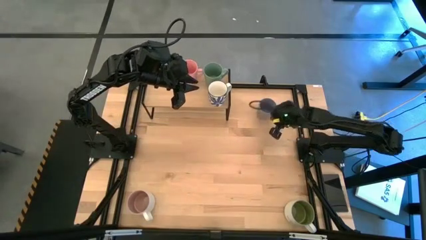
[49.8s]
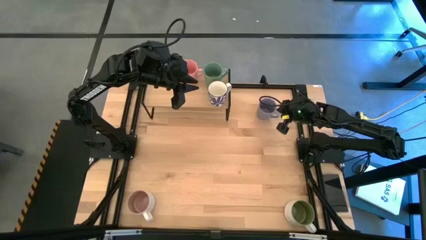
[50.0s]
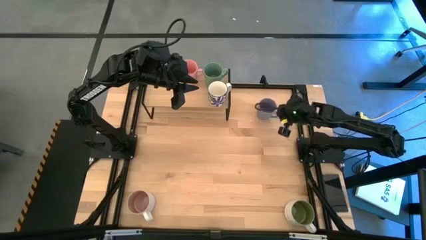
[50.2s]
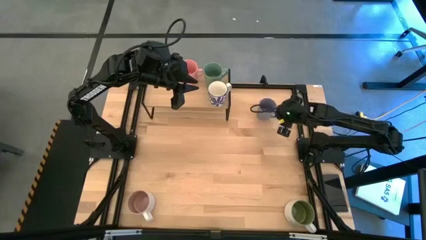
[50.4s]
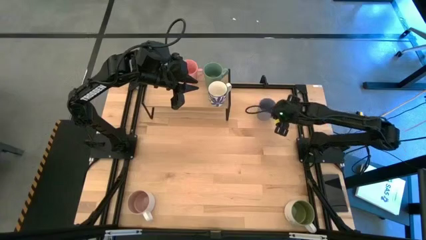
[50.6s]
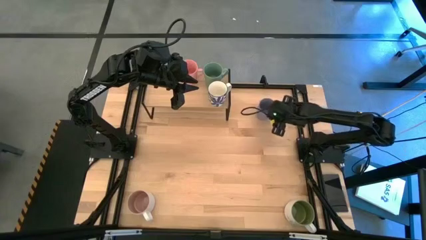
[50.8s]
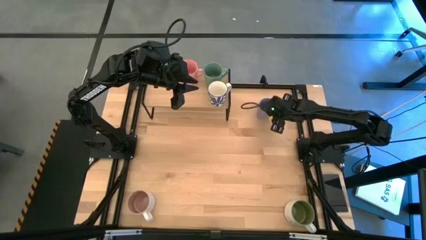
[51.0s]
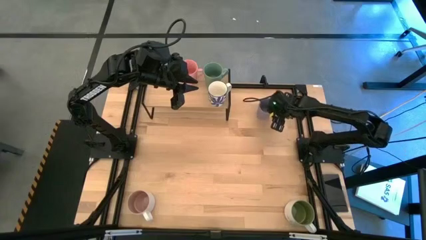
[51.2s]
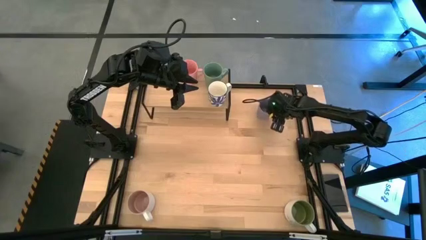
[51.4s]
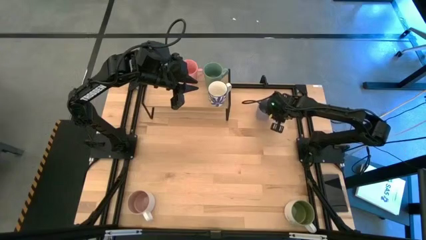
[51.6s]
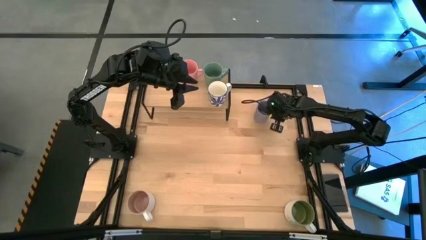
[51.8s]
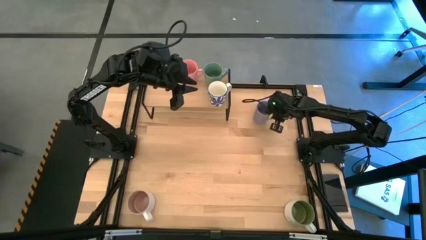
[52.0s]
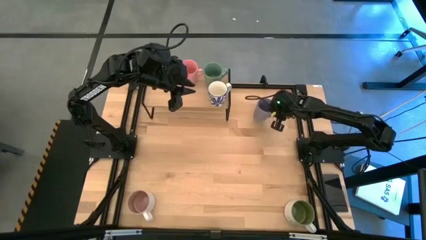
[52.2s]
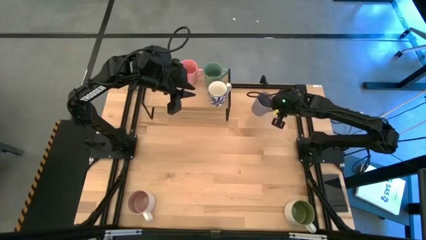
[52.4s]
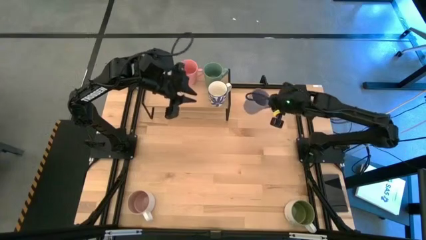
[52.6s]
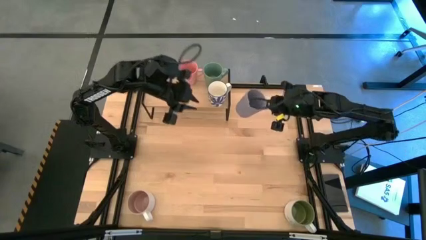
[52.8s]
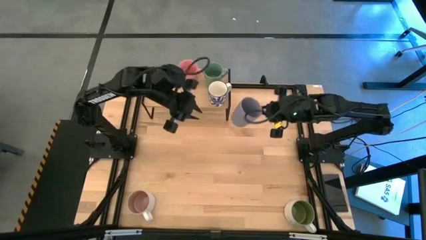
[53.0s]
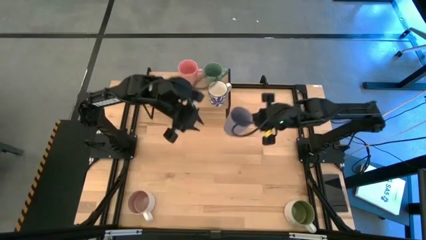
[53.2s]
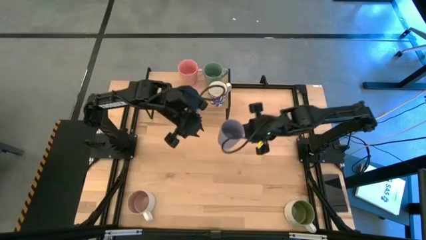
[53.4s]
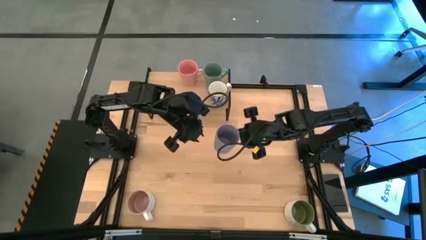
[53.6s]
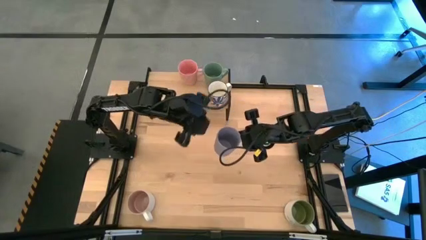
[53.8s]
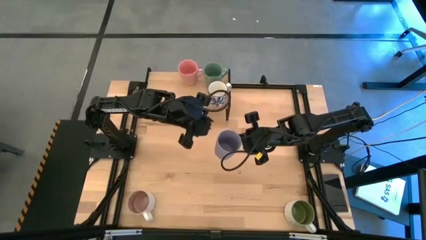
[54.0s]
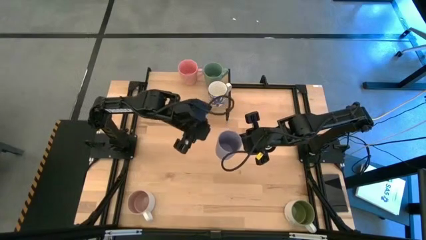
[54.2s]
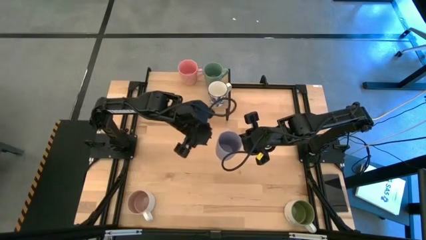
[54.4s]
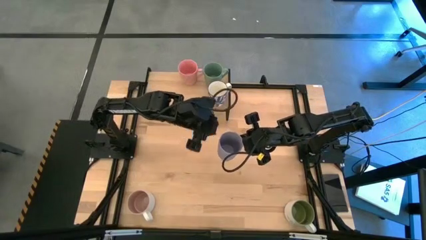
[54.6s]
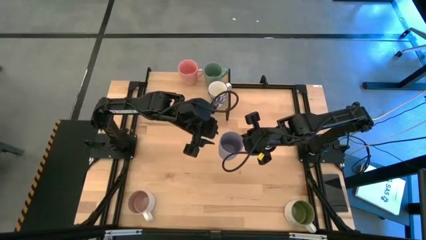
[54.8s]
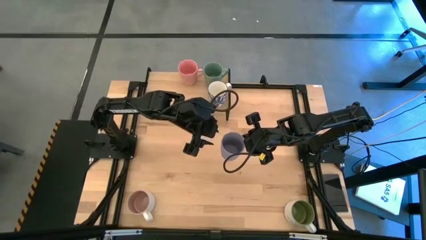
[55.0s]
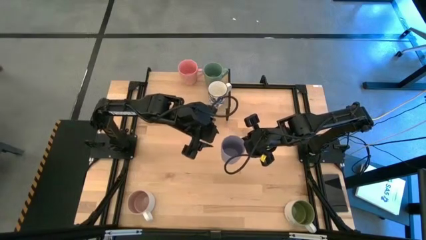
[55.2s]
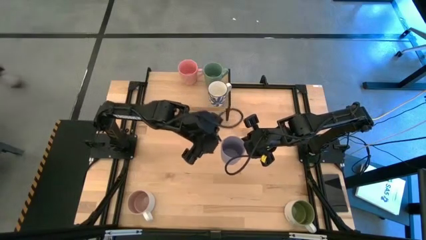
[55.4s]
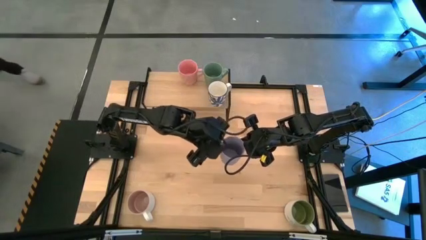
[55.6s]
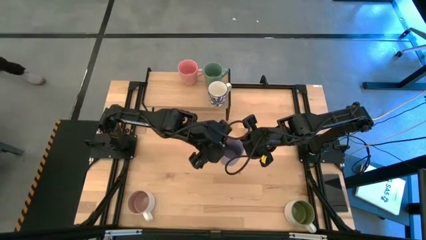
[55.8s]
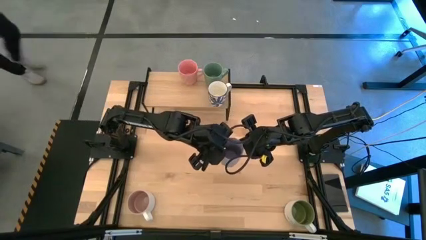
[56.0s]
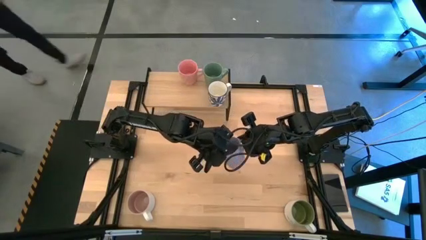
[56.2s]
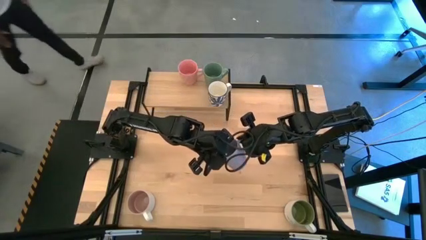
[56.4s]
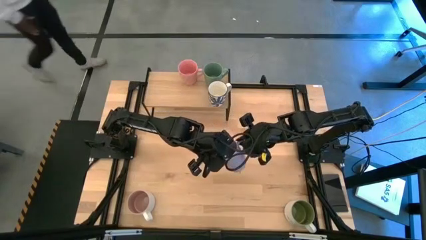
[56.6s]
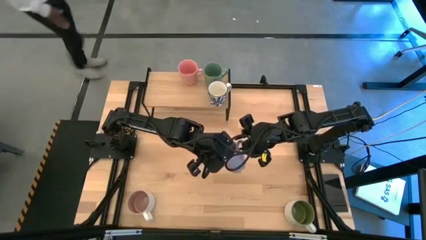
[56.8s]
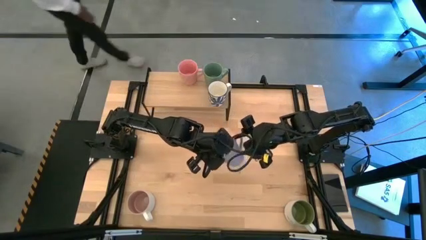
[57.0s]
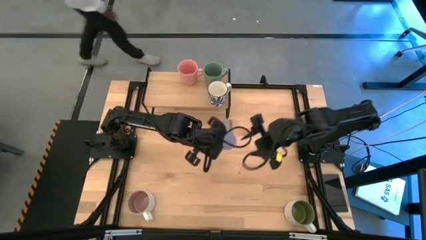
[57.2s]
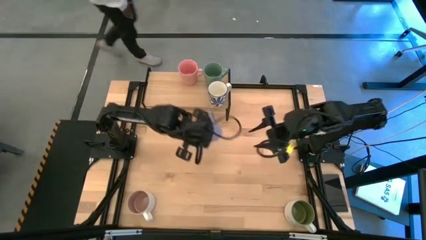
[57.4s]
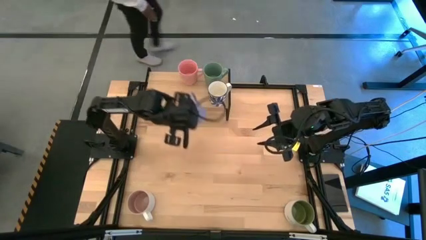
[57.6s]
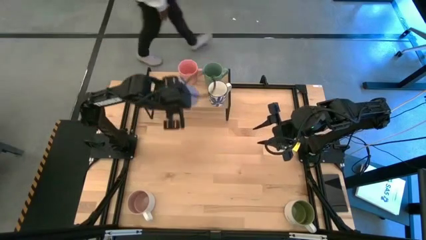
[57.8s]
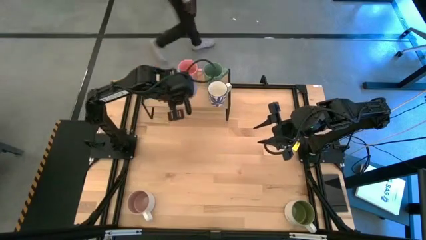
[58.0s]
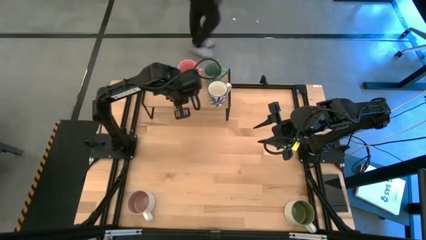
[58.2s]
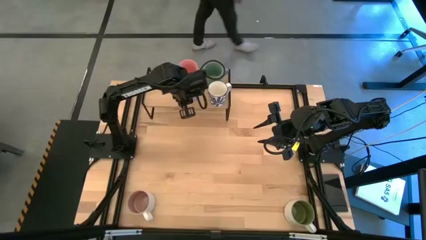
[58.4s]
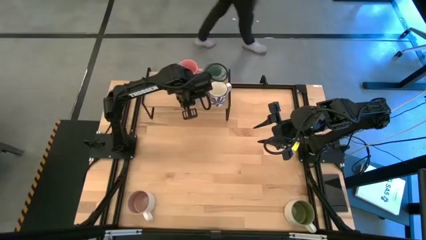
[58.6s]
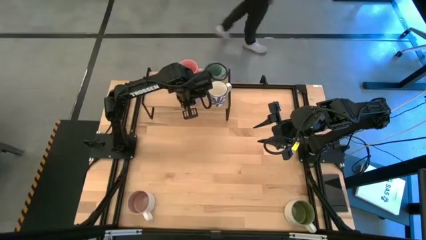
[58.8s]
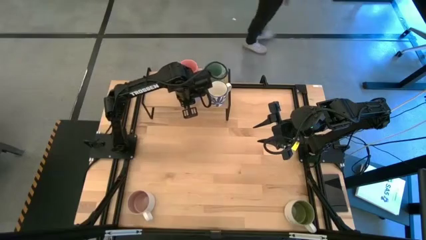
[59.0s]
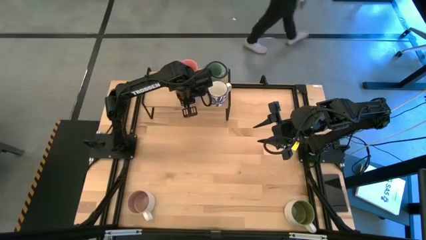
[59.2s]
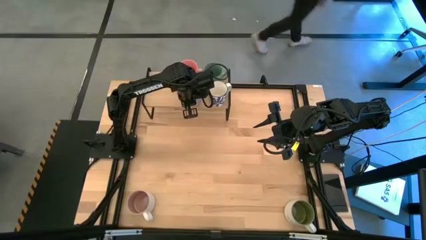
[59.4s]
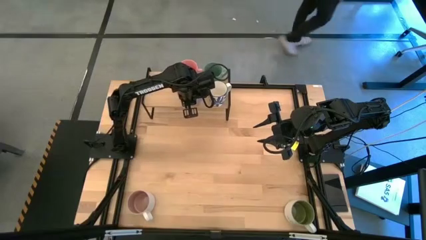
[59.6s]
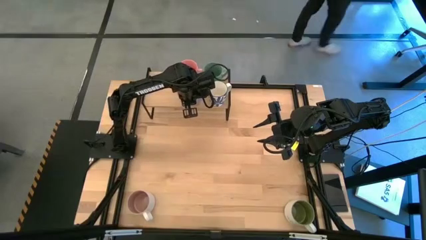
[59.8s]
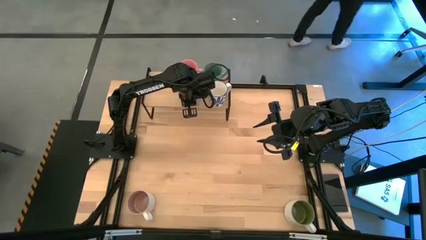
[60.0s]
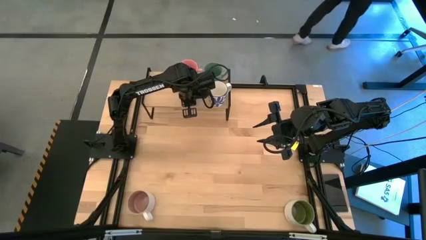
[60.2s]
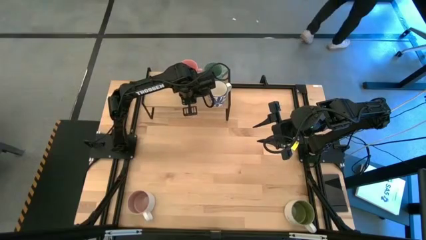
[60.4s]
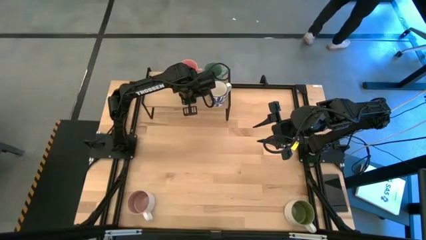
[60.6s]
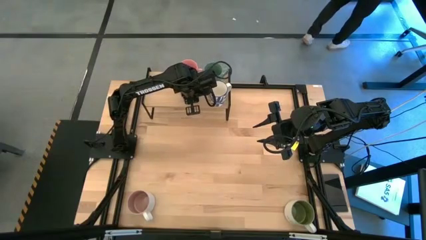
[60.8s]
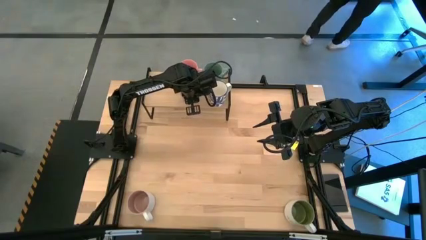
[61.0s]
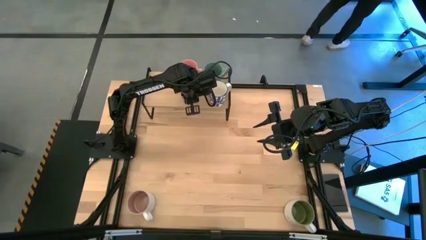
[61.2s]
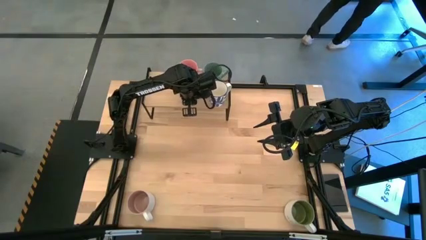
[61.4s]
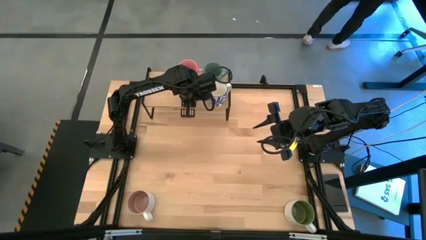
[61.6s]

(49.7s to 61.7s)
Task: Place coffee mugs
Put the blue mug on the shelf

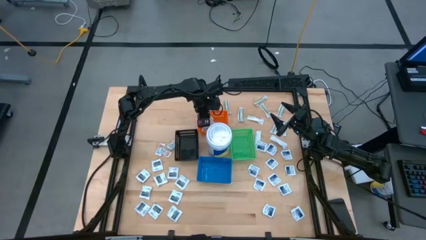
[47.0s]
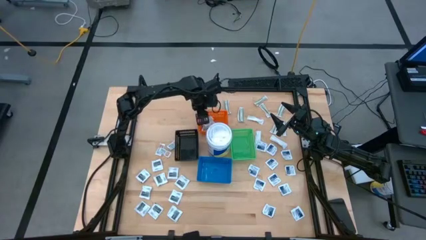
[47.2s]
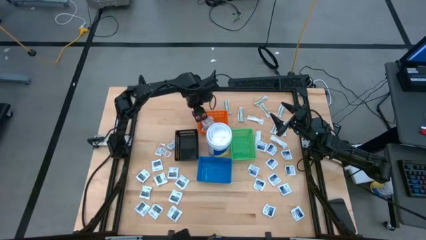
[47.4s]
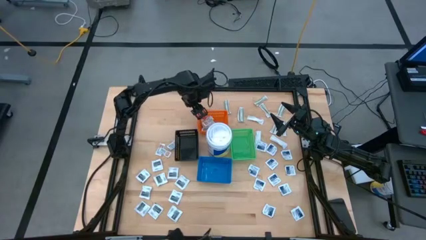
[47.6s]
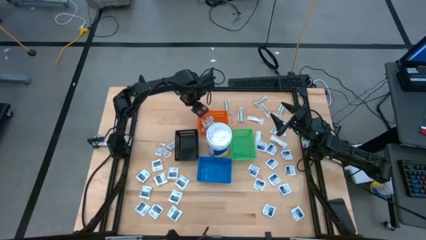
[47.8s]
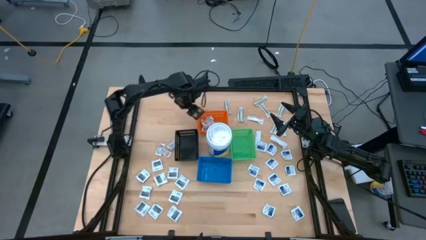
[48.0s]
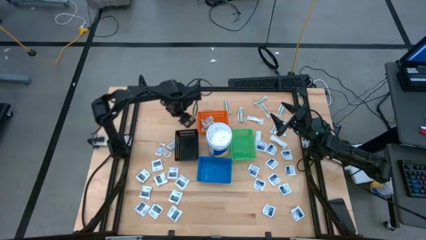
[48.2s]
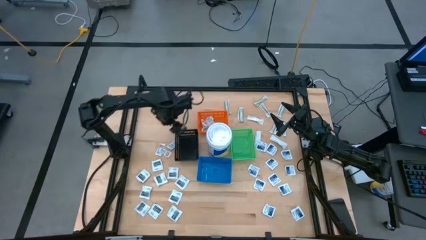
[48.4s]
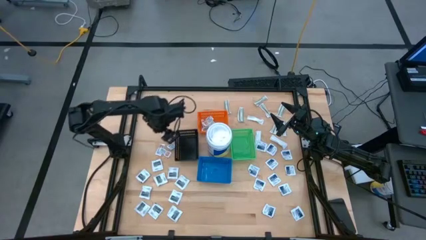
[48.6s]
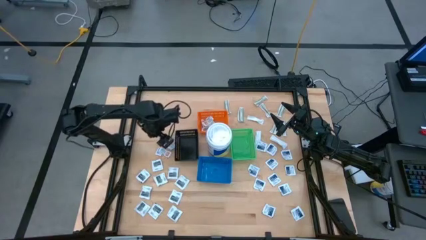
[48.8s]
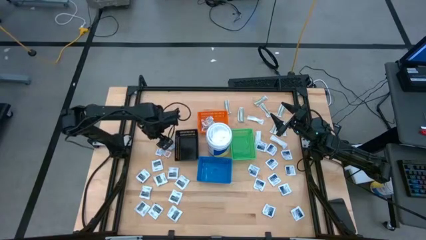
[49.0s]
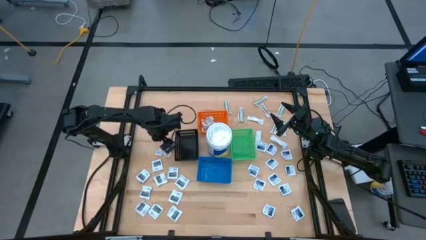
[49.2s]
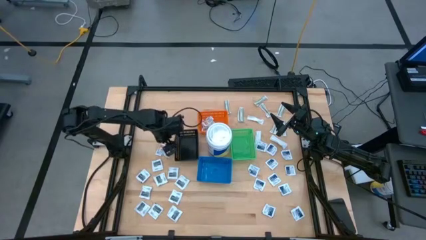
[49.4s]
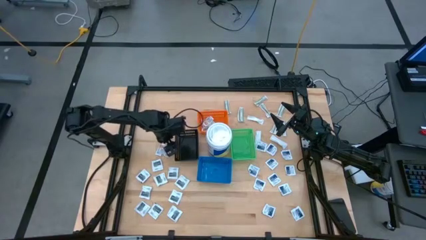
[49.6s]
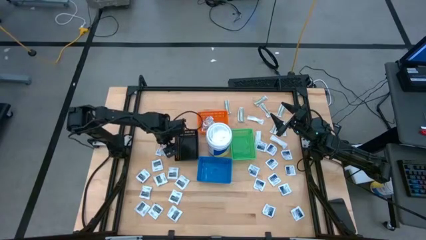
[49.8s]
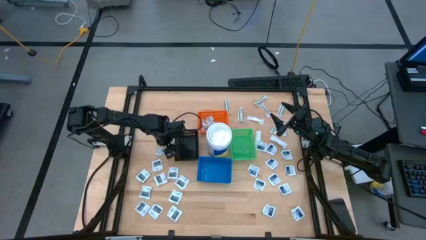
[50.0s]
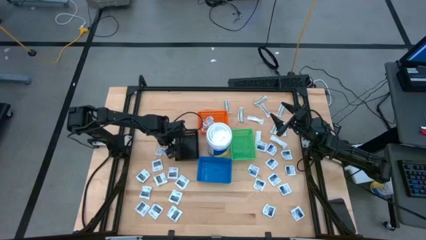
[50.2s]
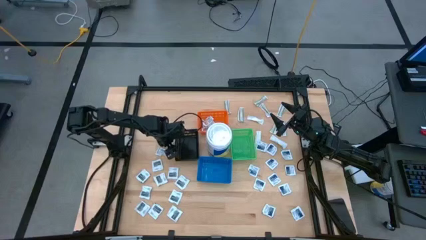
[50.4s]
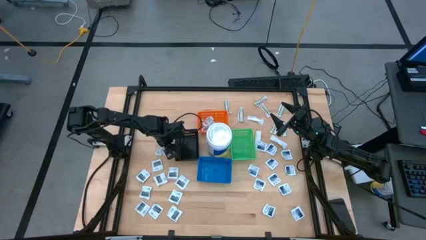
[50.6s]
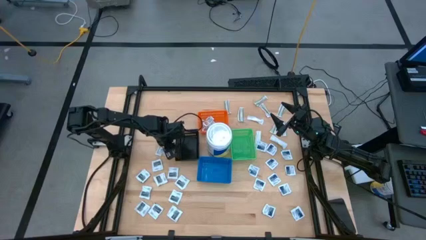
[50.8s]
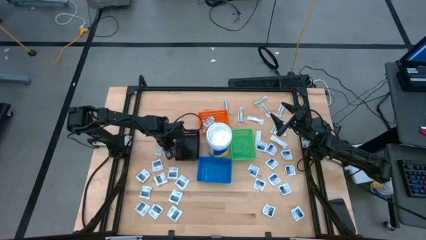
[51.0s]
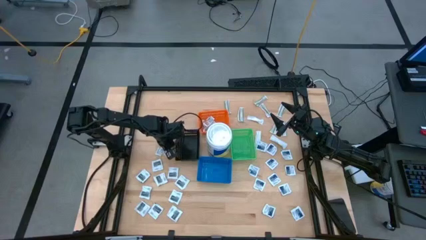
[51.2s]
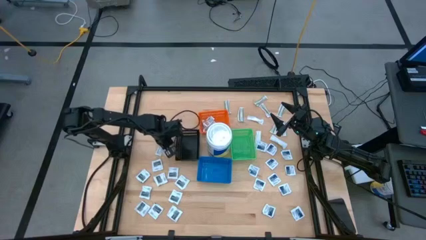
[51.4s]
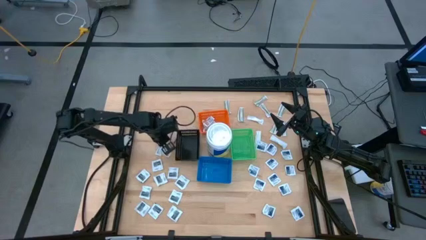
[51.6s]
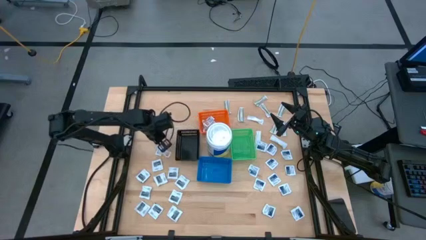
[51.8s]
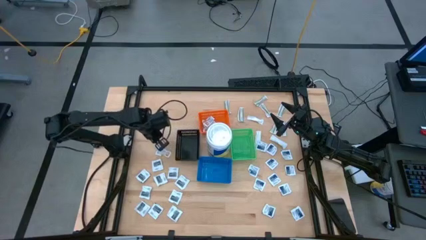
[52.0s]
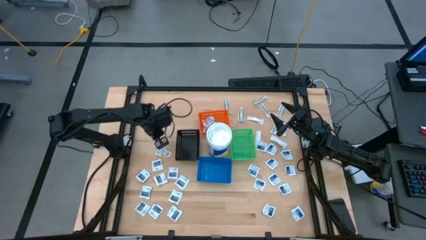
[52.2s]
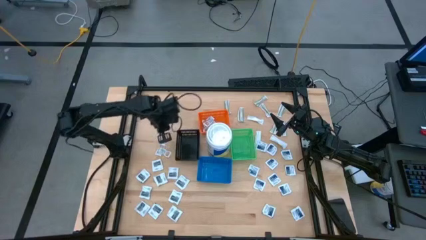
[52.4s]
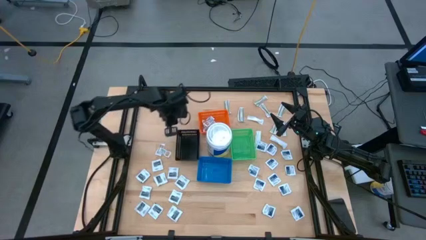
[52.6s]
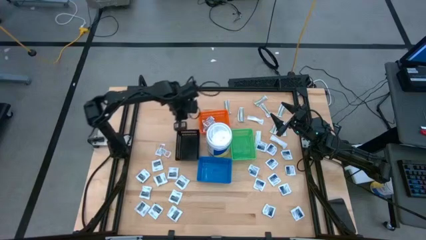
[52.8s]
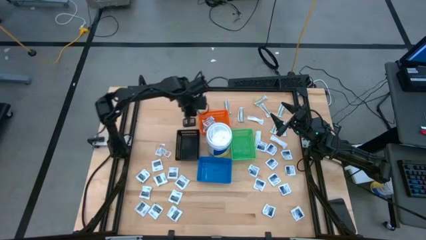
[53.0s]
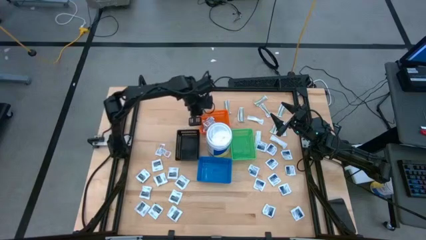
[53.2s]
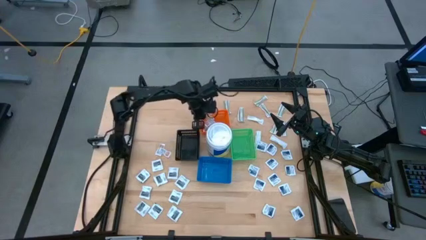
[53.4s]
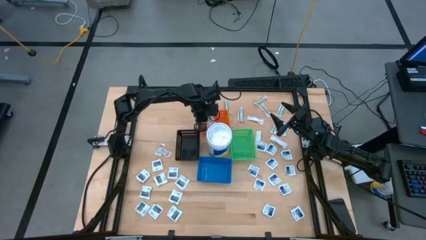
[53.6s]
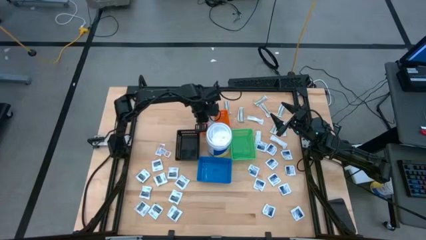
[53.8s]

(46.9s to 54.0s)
Task: Pick & Place First Aid Supplies
Put the orange ointment pack into the orange bin
